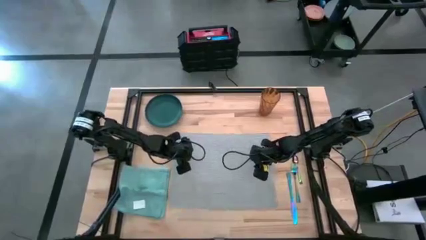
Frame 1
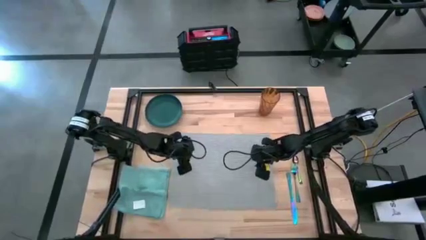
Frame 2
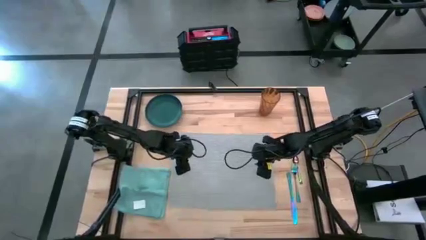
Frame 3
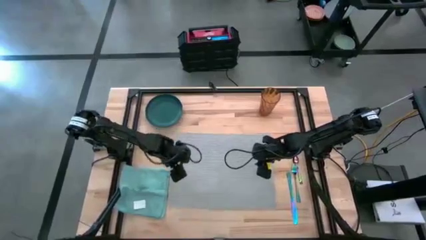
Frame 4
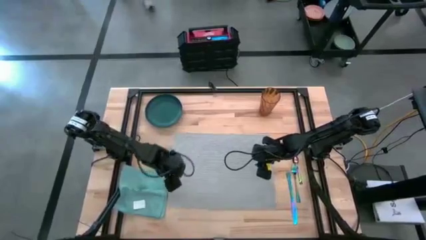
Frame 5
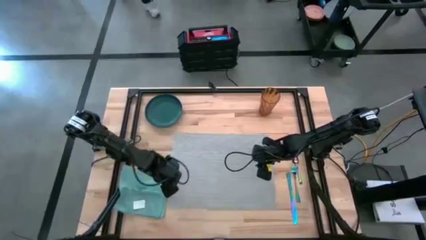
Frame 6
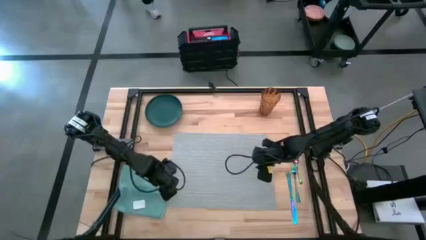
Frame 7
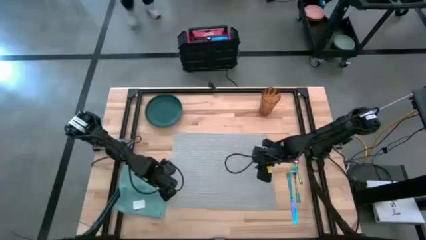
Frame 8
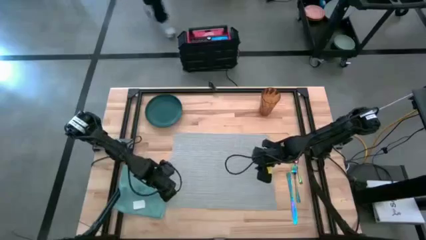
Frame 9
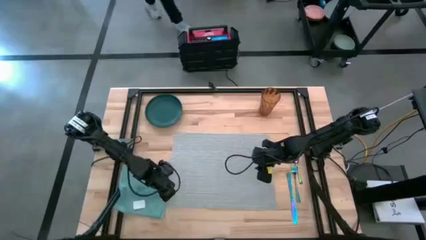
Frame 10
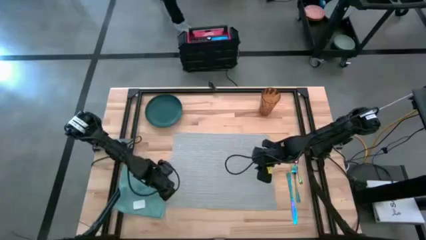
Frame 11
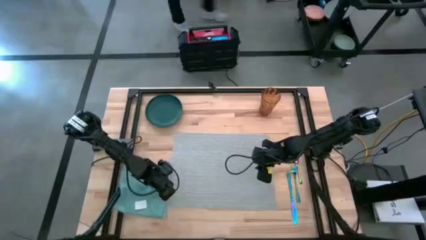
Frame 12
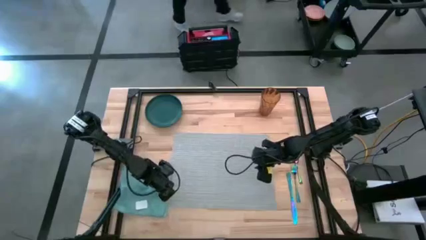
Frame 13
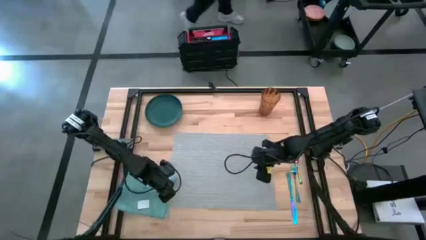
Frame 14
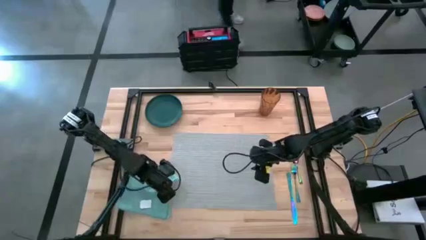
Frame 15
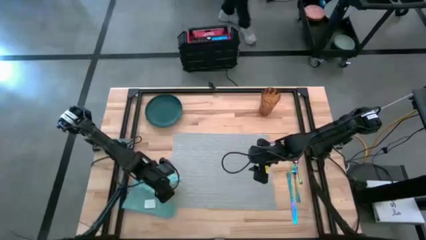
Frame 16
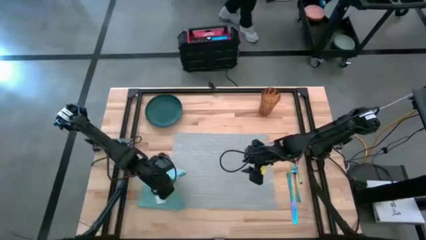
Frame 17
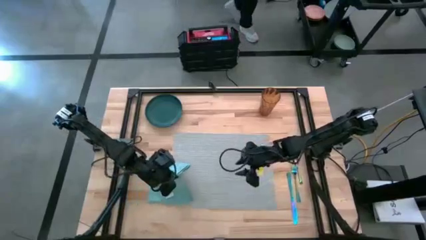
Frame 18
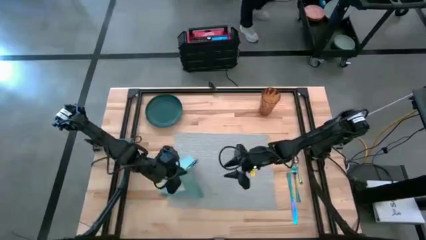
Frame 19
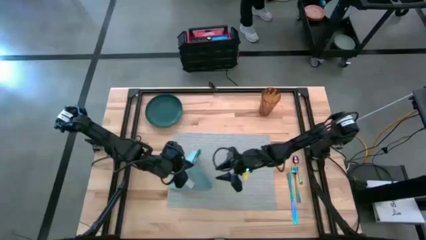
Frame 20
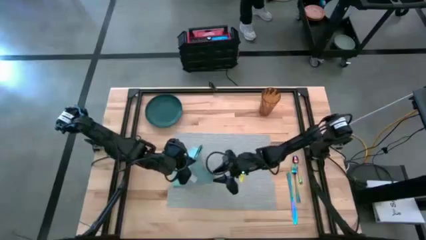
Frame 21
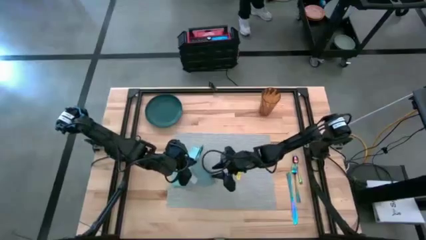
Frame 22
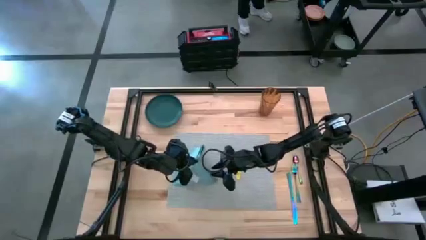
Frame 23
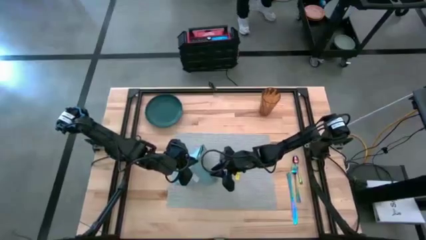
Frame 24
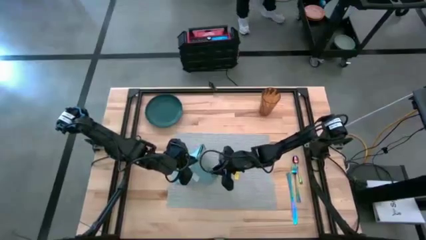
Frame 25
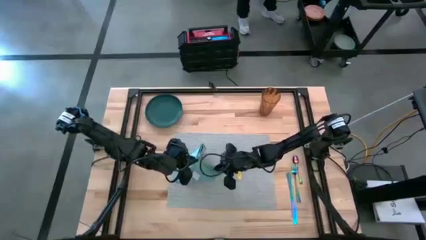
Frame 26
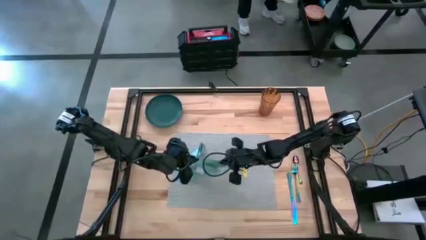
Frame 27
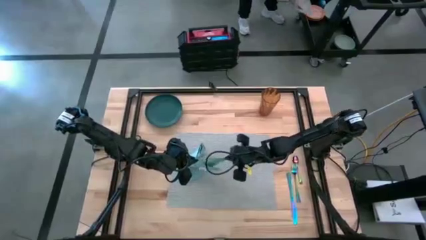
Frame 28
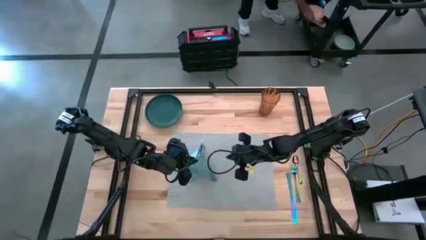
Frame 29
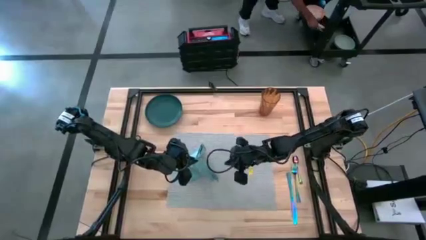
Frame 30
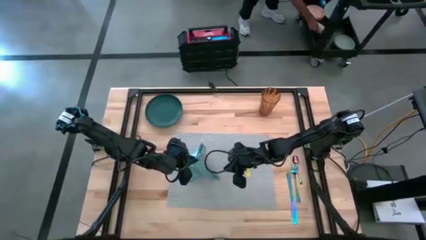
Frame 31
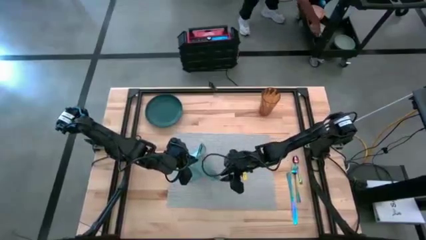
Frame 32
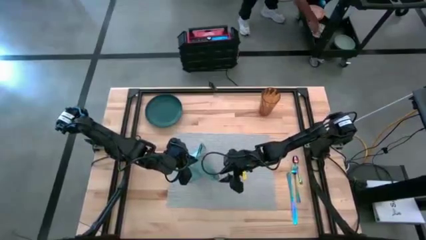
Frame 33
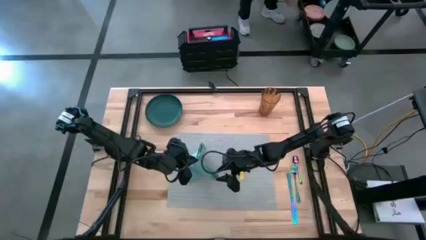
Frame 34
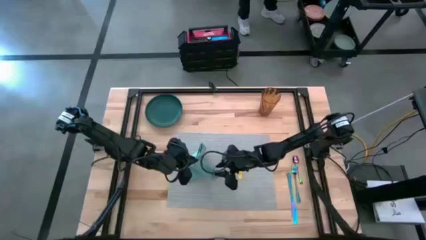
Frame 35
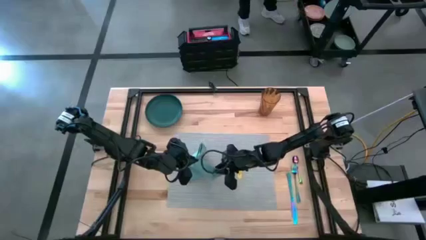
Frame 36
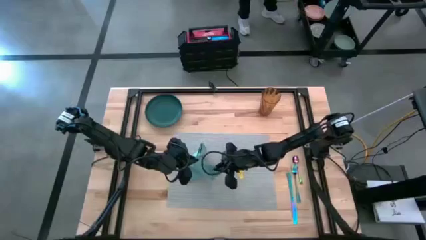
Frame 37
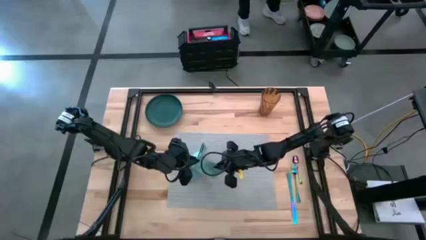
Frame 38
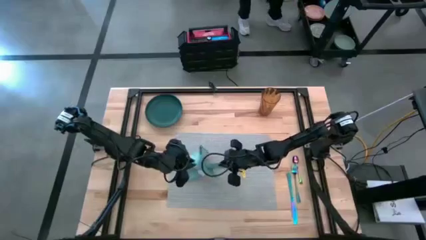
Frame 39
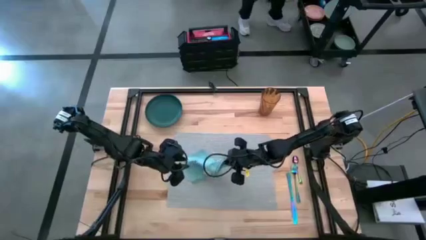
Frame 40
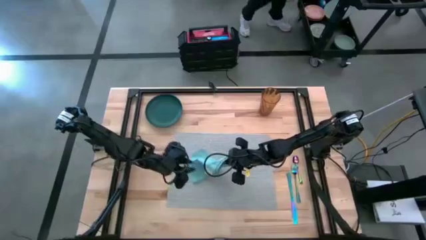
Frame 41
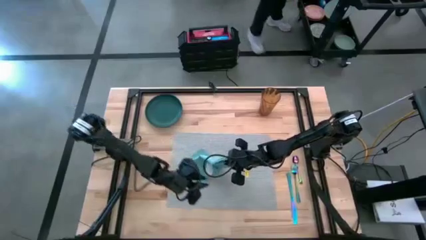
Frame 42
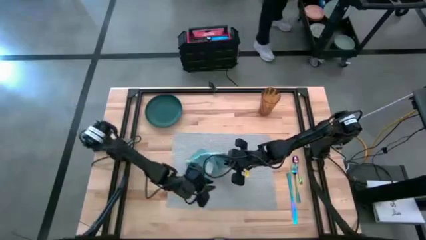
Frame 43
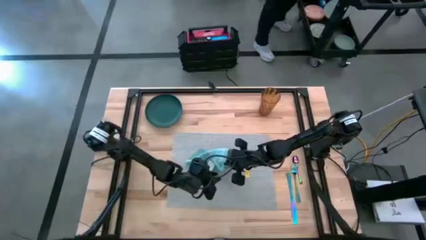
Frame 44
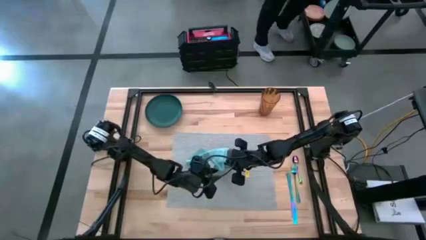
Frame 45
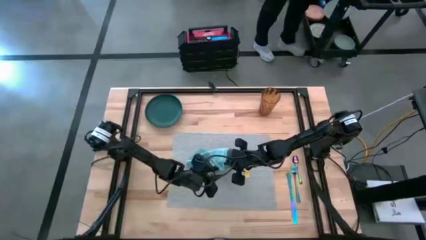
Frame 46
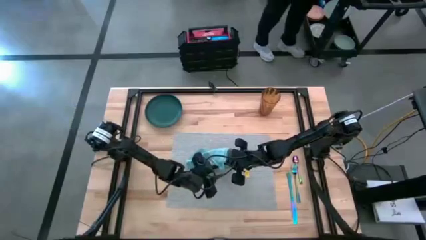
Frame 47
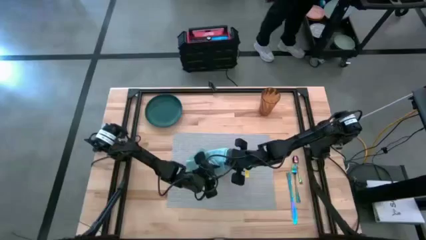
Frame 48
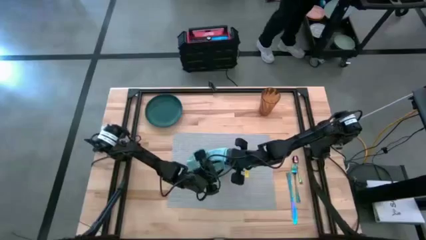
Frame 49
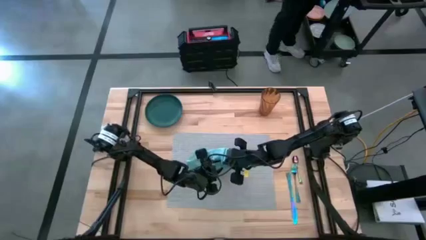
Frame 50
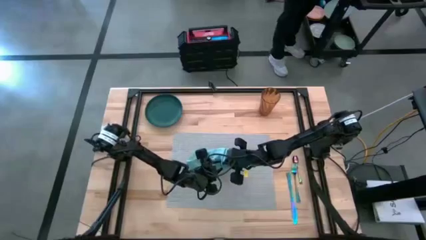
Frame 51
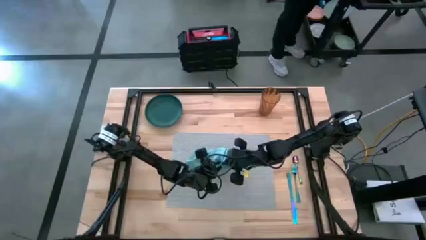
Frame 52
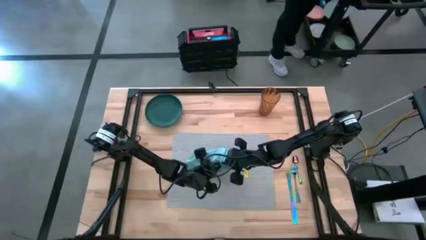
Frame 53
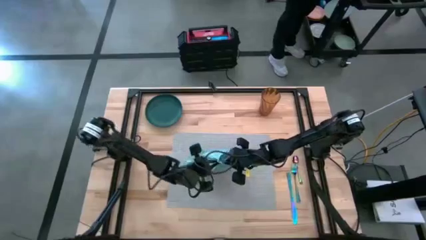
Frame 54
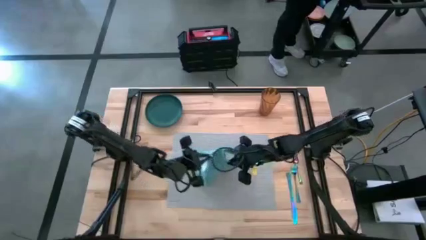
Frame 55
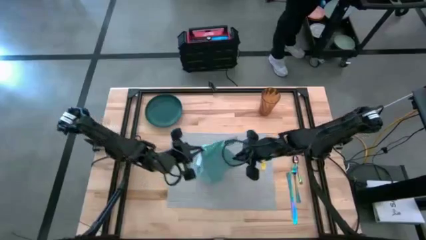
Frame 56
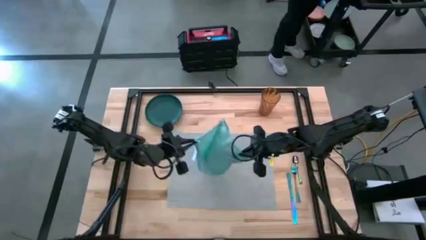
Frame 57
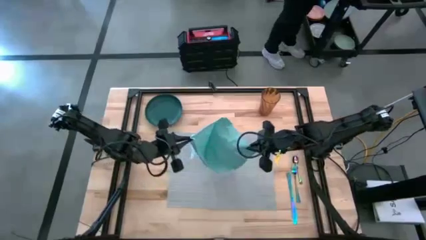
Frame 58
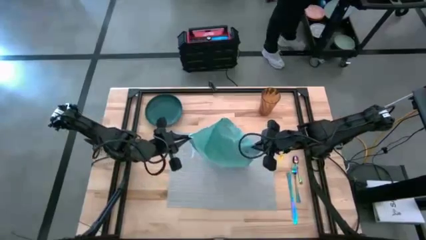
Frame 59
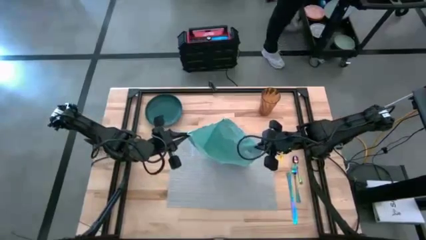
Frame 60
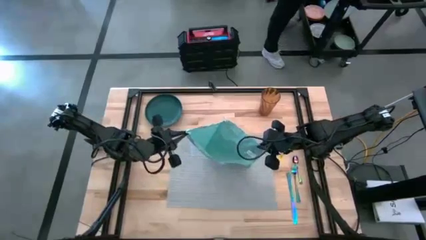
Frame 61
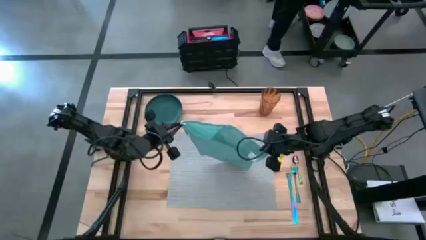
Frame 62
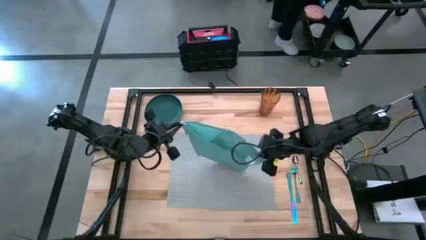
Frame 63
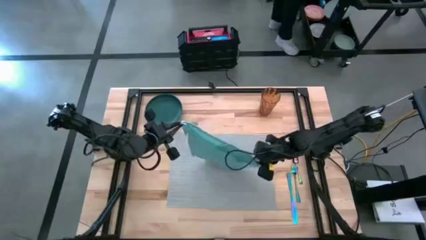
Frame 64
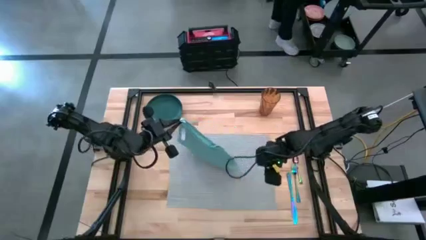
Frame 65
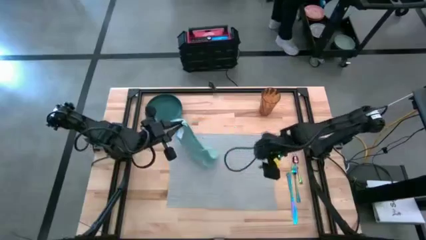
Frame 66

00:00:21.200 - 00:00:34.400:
Task: Set table place
Fold the light blue table napkin

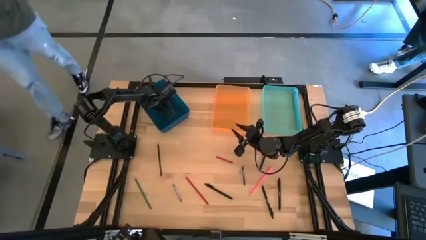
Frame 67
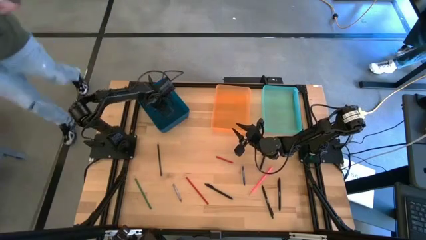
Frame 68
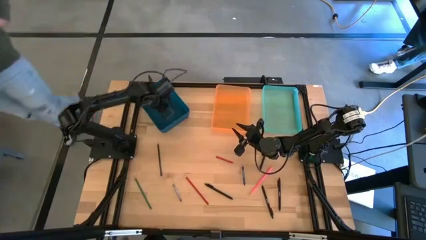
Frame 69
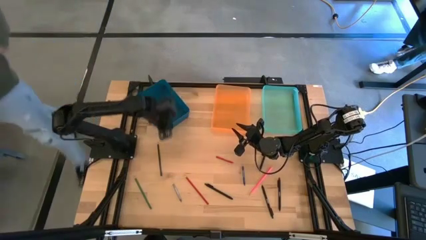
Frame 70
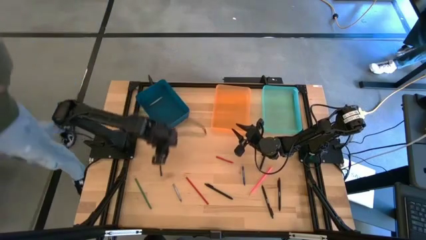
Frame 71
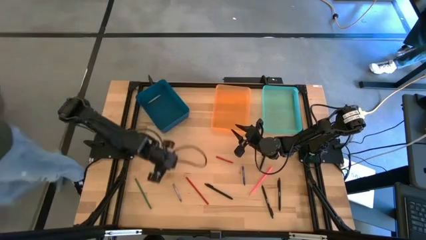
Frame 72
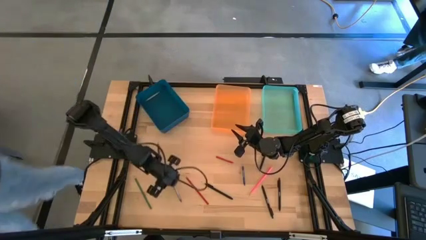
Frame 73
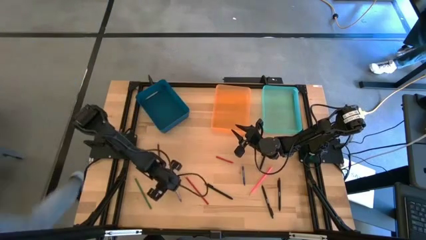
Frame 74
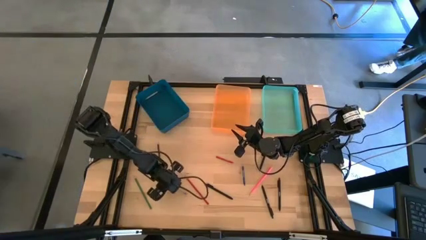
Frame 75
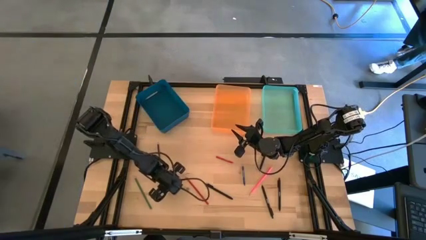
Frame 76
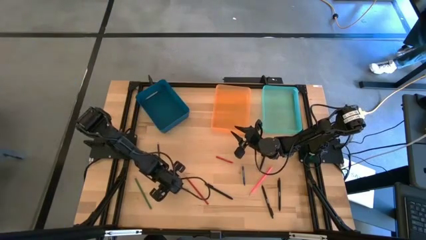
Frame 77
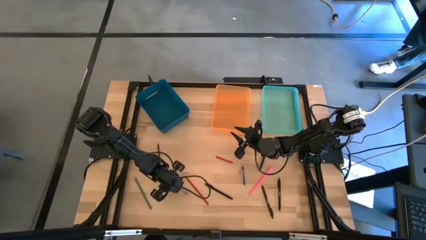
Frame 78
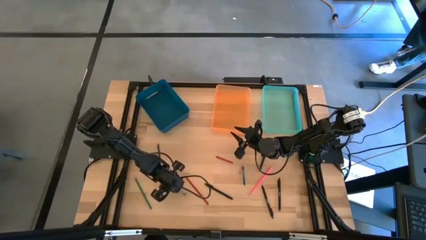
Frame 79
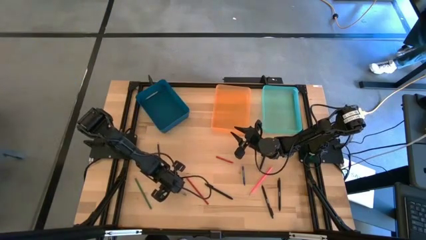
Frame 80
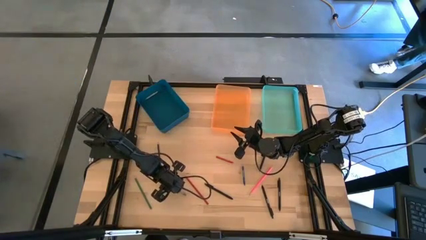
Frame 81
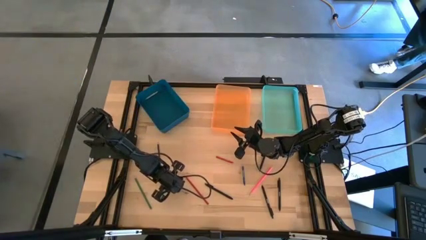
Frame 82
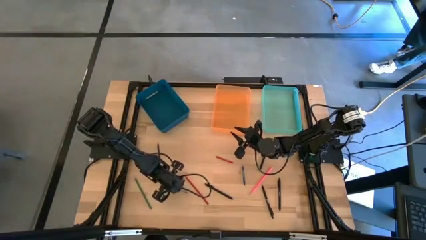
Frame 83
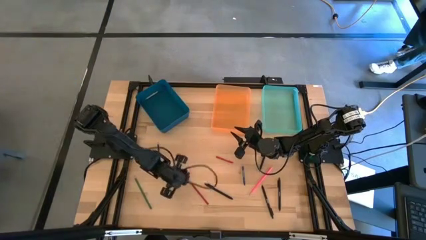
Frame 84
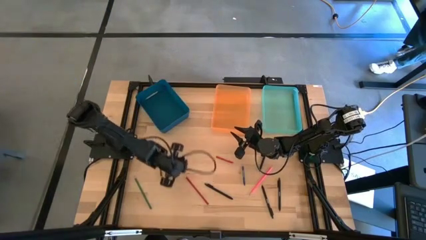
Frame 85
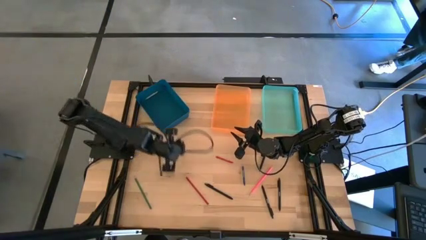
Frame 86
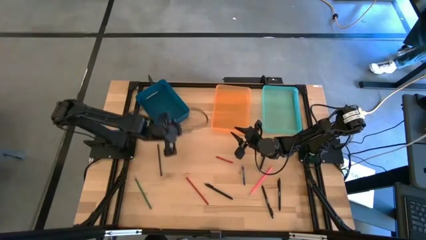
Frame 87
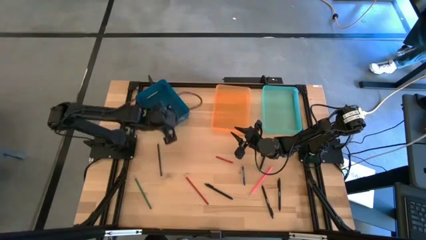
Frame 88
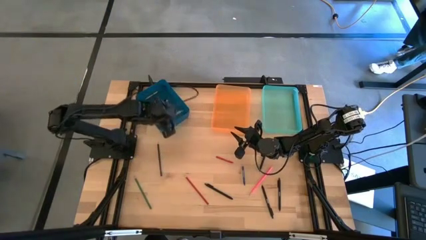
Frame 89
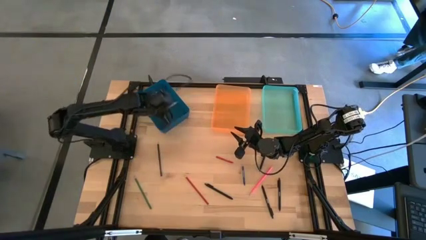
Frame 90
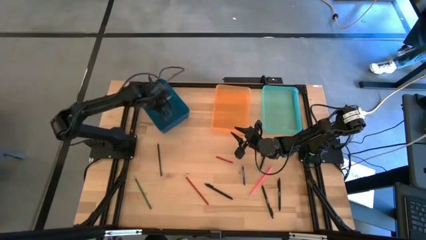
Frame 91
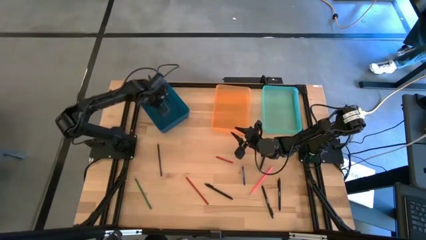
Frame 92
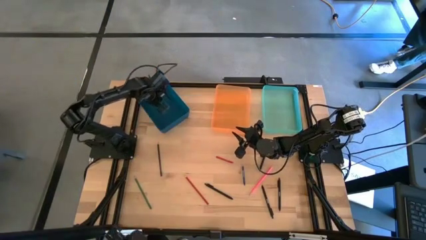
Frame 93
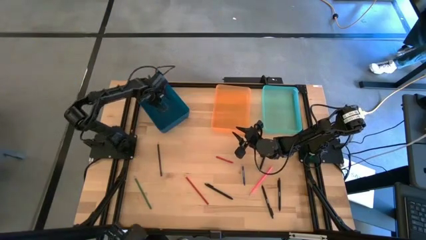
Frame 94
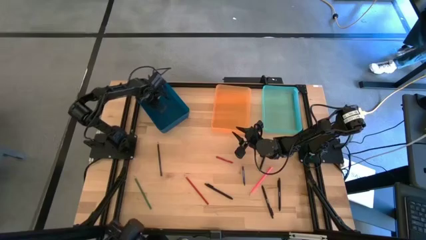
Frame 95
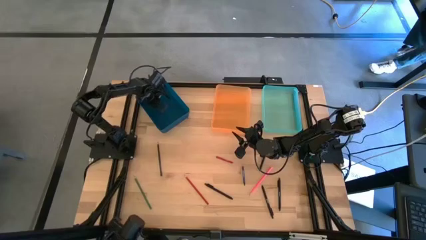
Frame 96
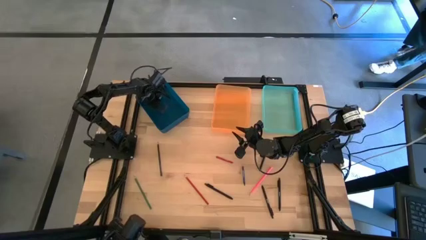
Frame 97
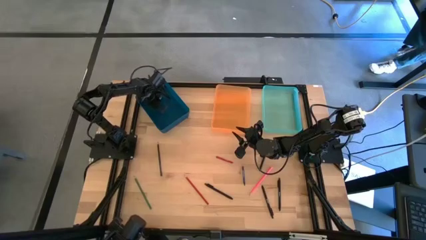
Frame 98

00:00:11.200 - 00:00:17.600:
Task: Sort crayons/erasers/pens/pencils in bins
Put the gray crayon into the blue bin
